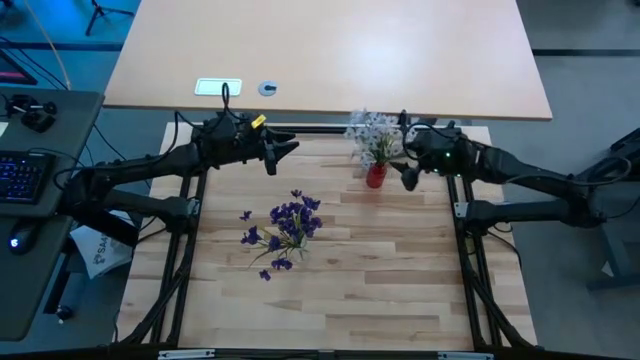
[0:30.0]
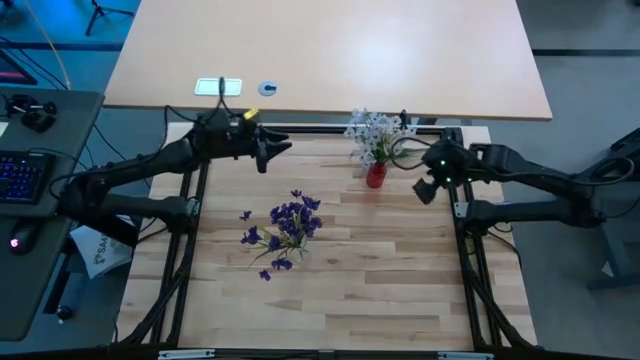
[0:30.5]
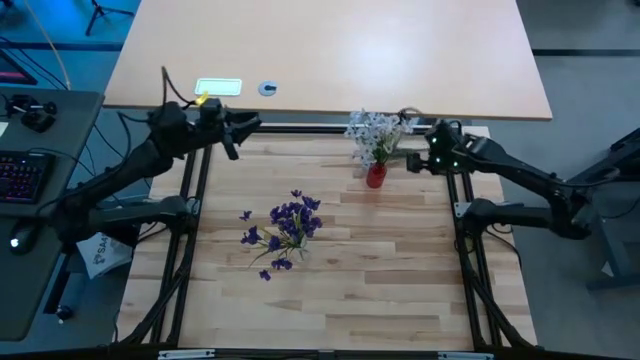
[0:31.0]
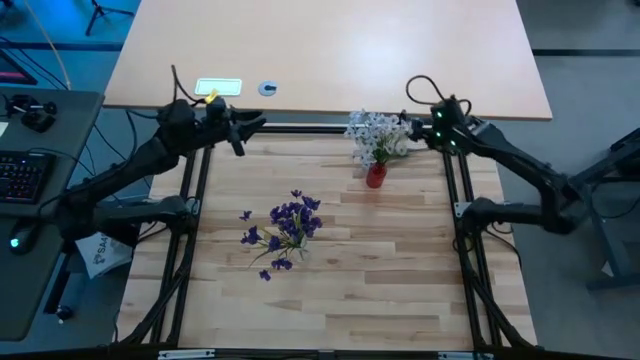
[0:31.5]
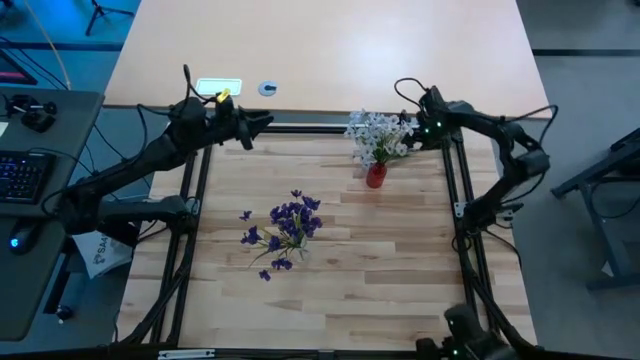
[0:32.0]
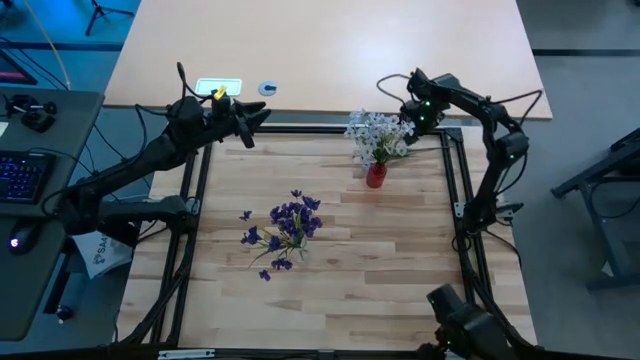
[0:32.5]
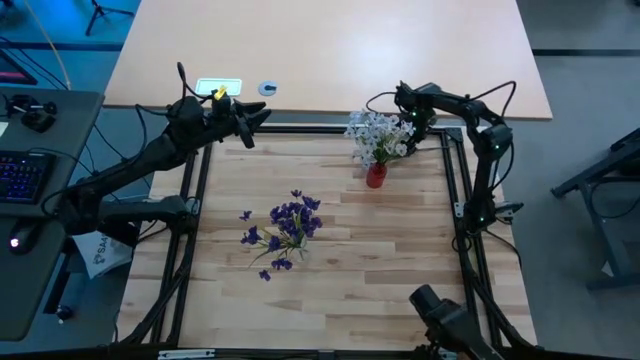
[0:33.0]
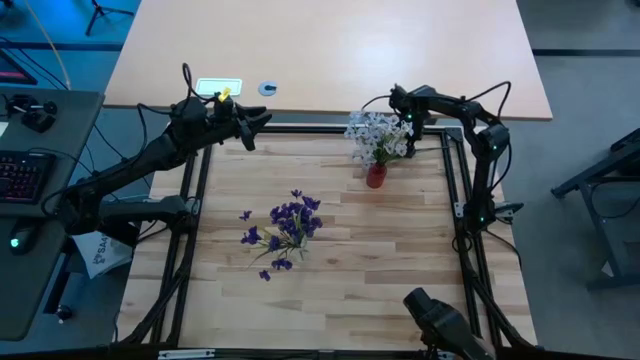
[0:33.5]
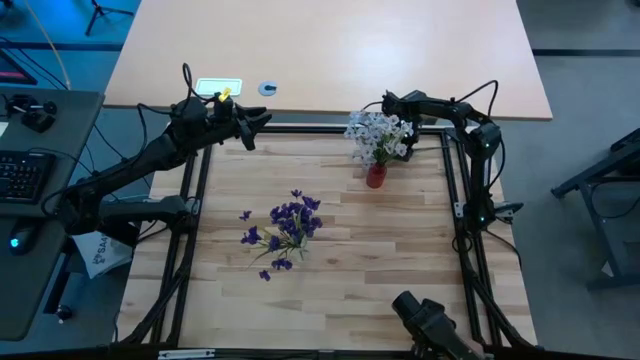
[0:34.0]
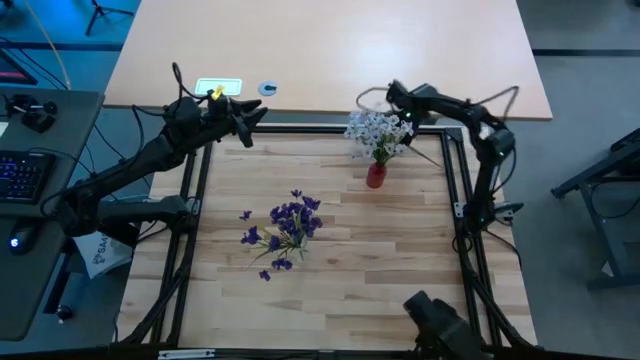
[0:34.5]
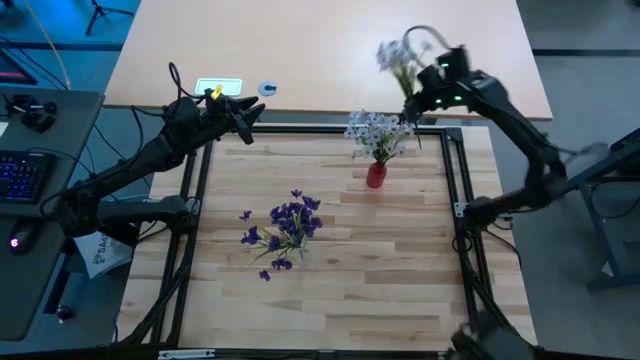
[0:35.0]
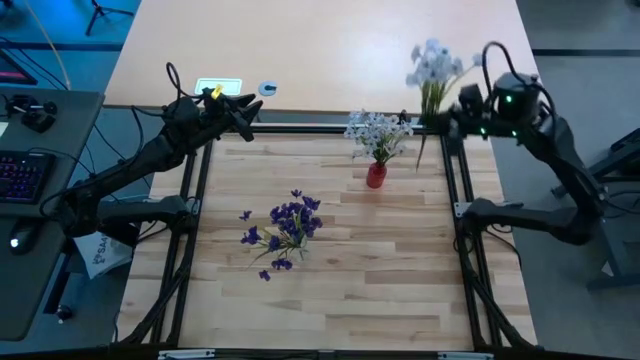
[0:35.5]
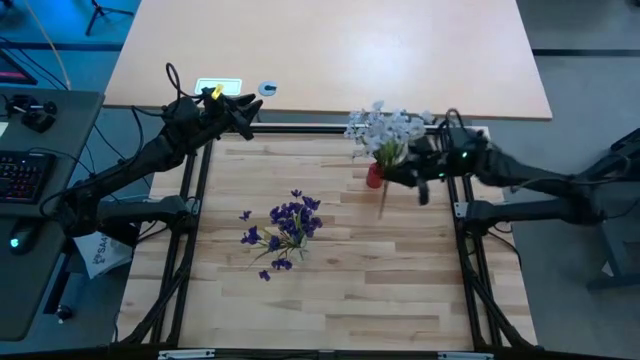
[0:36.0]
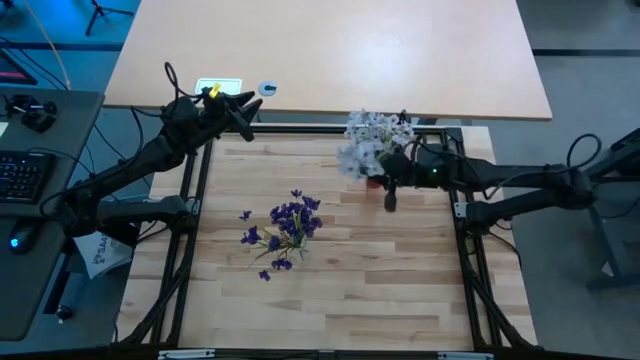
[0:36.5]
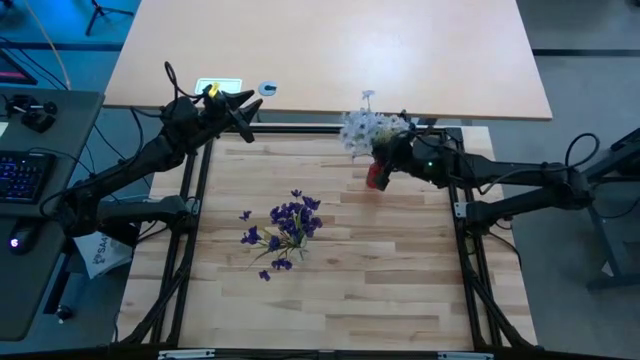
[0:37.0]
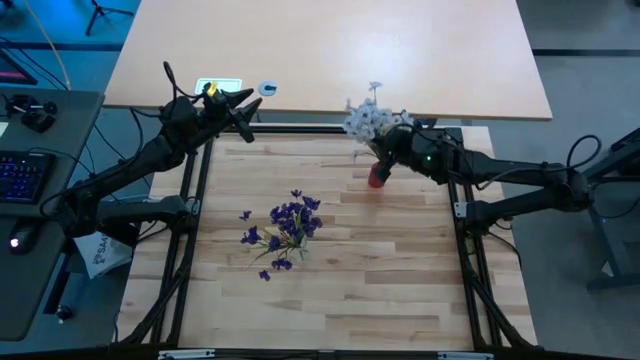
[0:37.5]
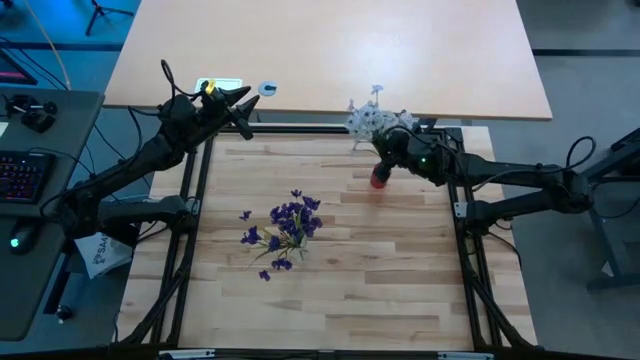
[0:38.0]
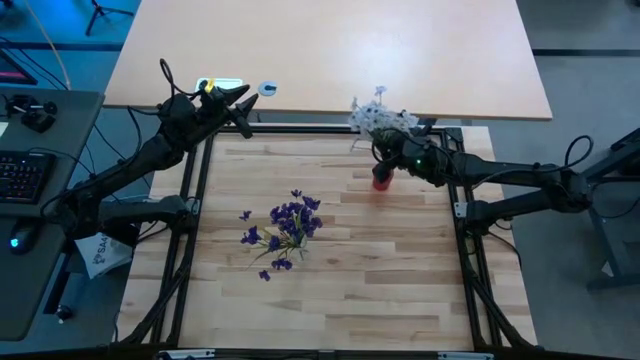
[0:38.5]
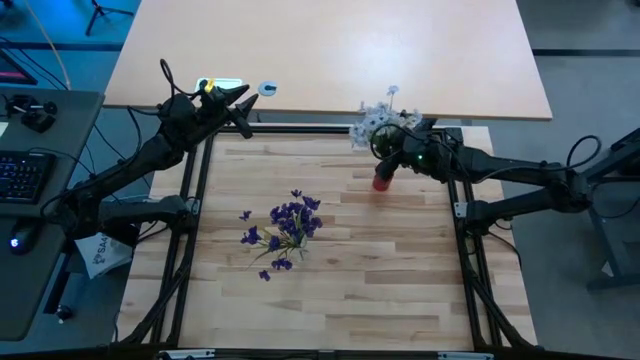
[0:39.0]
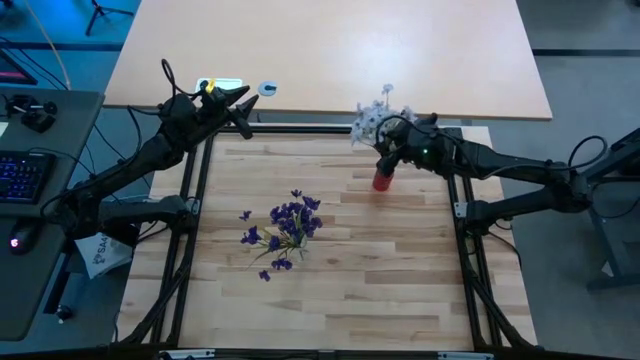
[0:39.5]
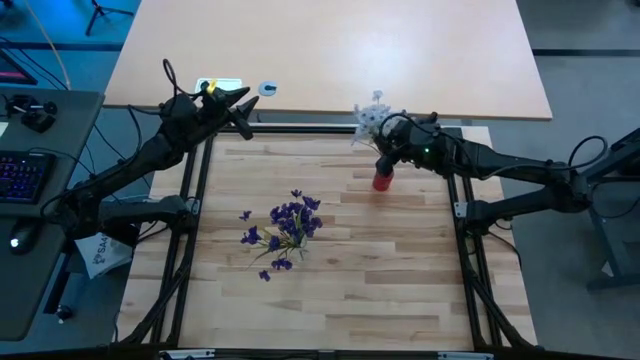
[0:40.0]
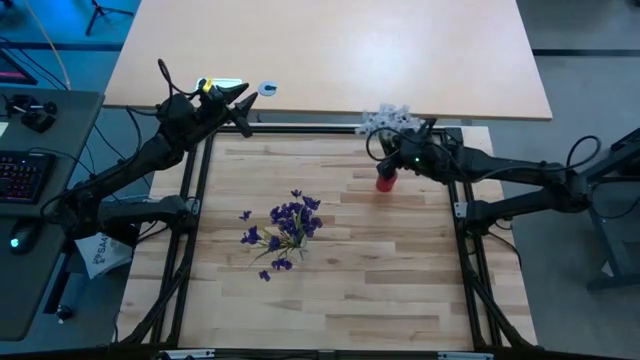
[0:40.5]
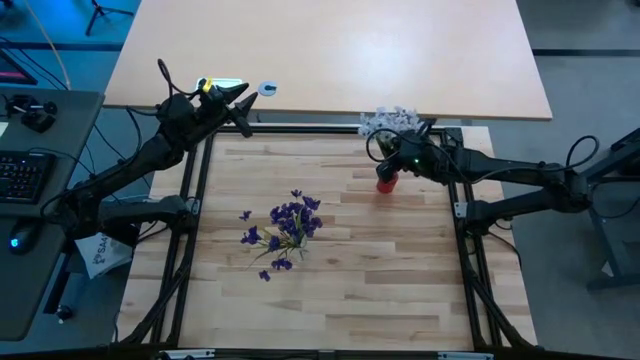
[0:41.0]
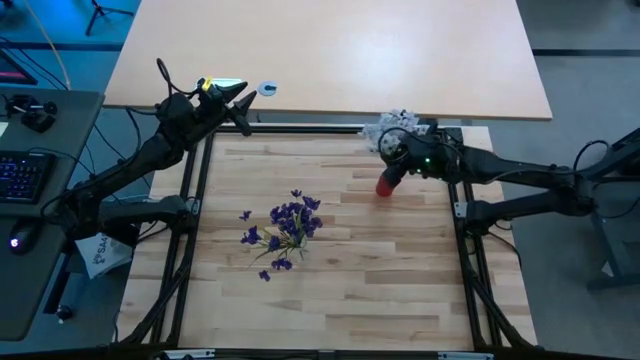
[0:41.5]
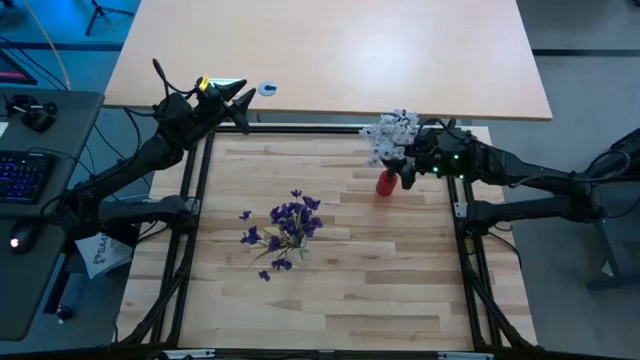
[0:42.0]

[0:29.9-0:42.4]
Task: Sort flowers into vase by color
Put the white flowers into the red vase

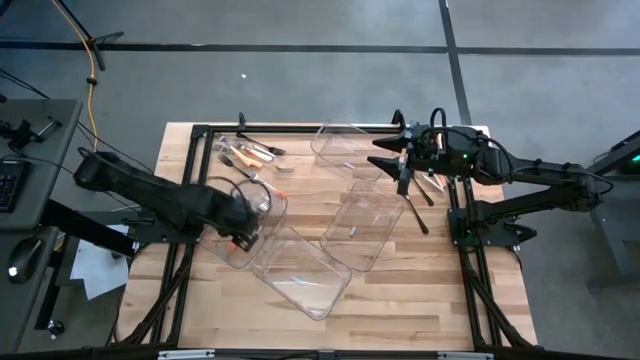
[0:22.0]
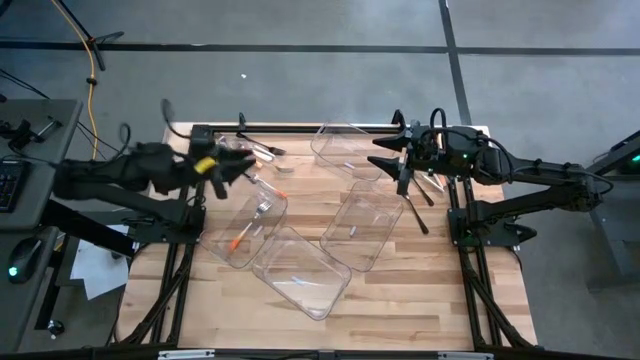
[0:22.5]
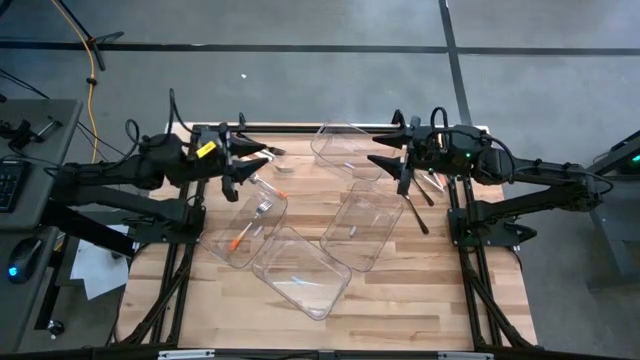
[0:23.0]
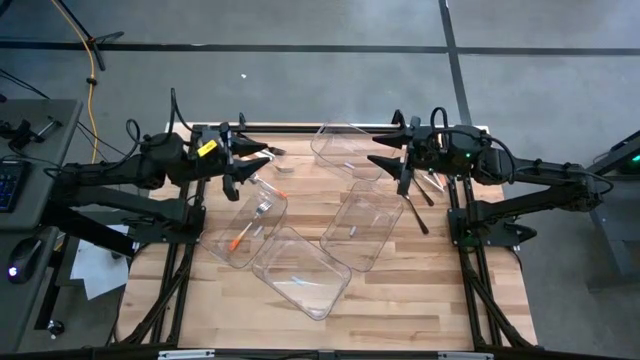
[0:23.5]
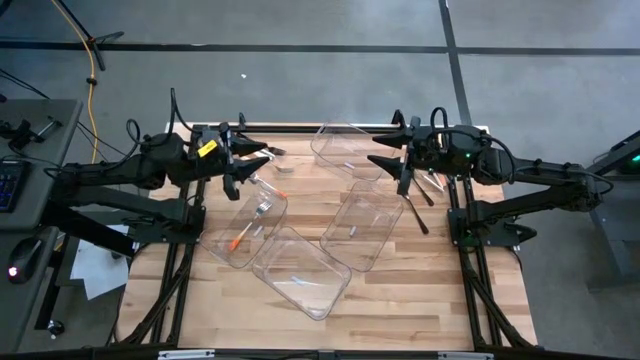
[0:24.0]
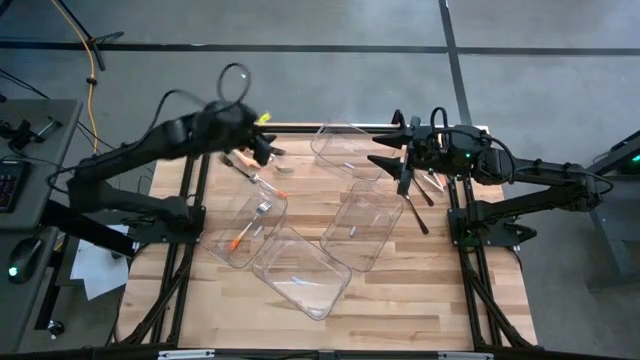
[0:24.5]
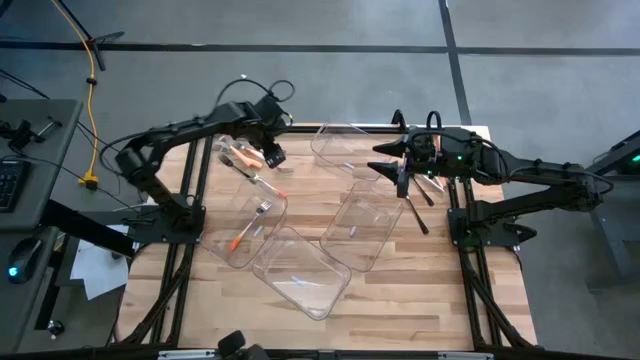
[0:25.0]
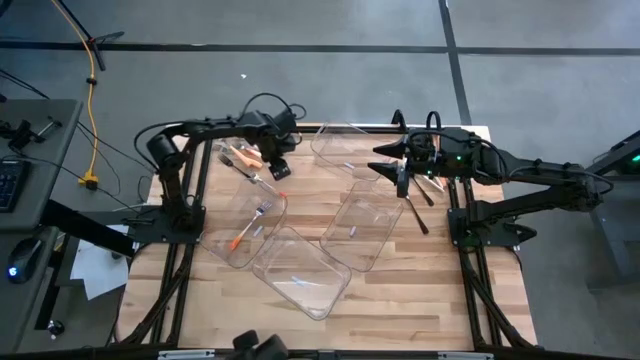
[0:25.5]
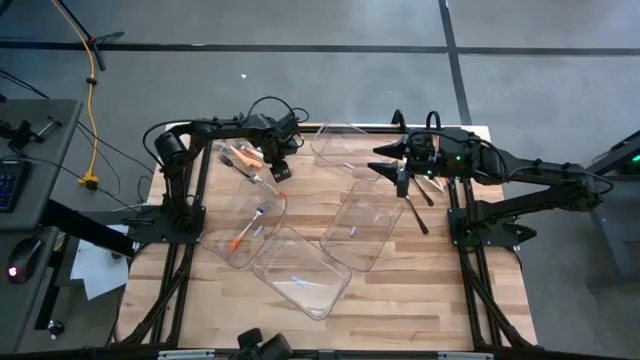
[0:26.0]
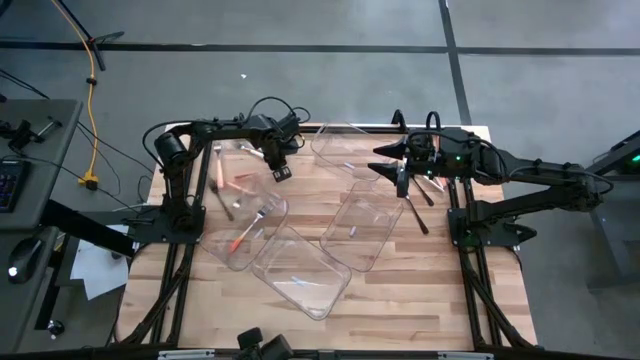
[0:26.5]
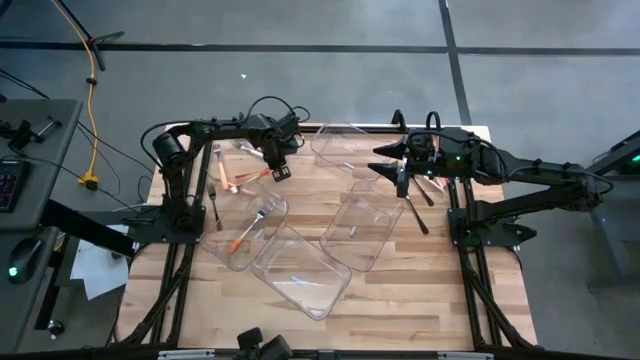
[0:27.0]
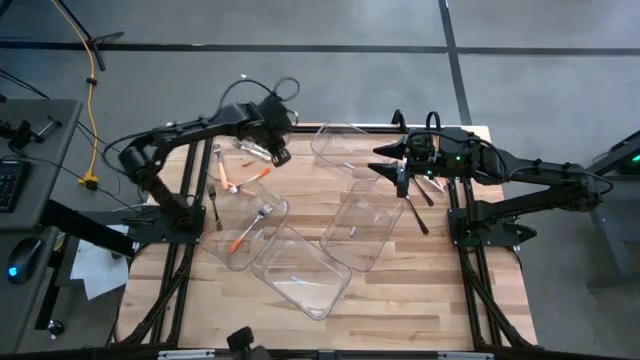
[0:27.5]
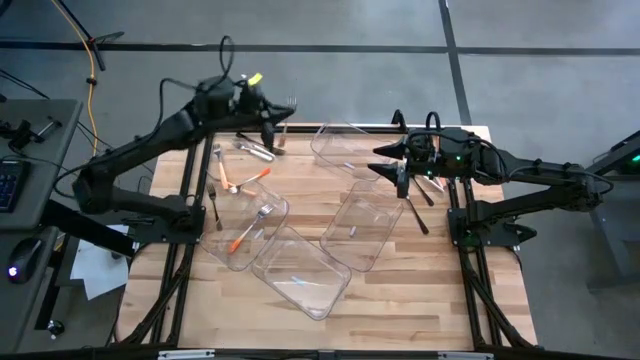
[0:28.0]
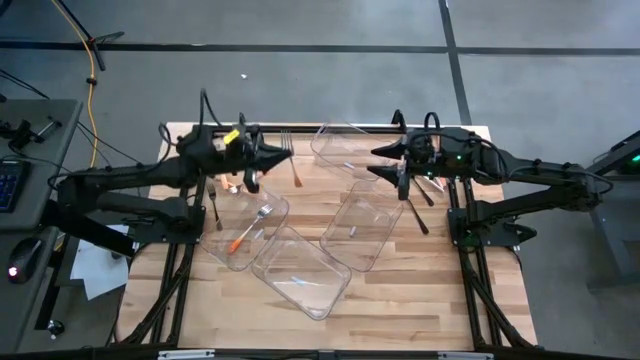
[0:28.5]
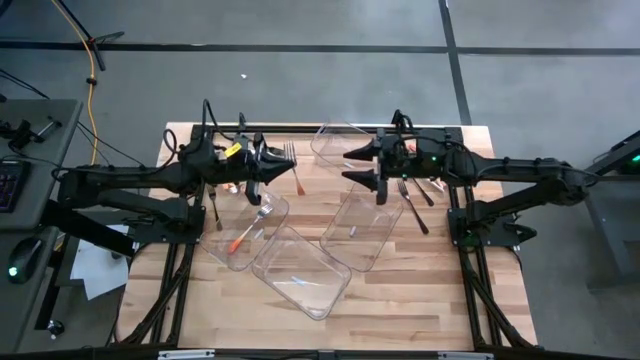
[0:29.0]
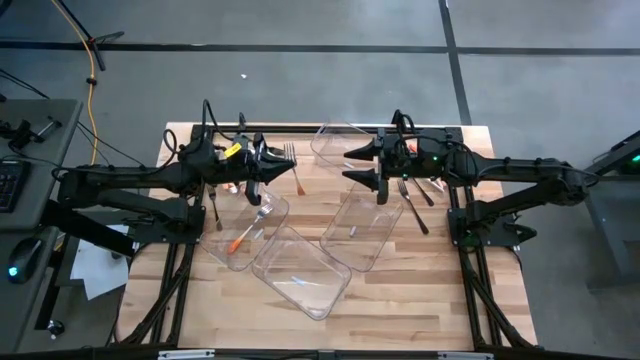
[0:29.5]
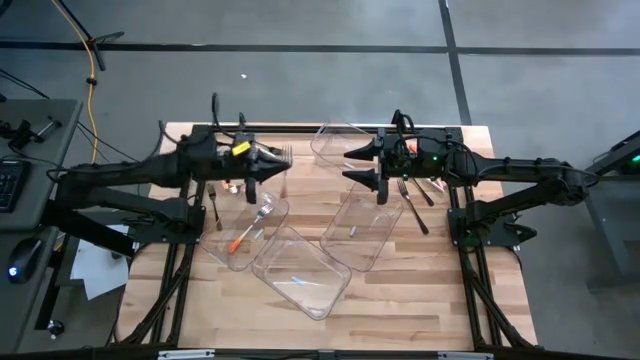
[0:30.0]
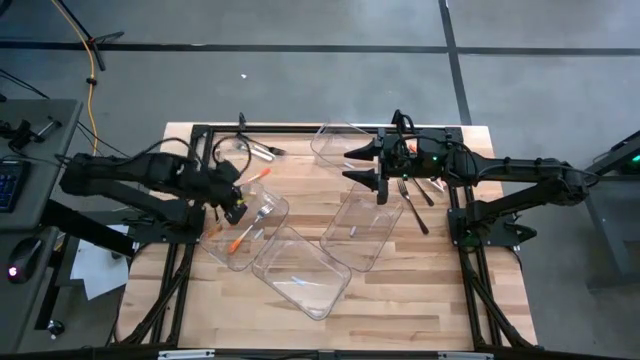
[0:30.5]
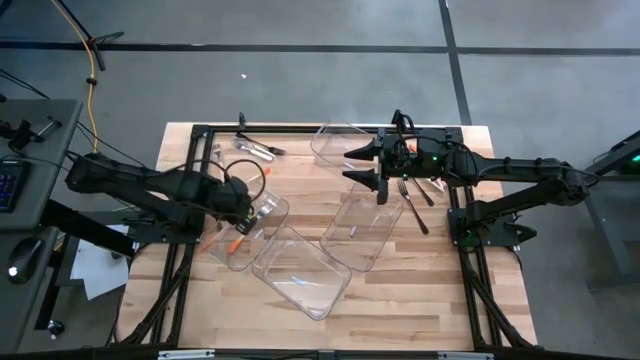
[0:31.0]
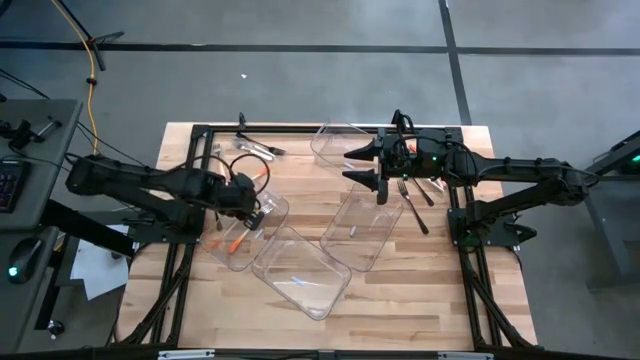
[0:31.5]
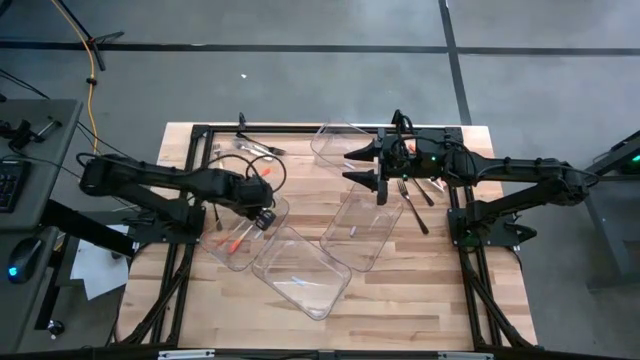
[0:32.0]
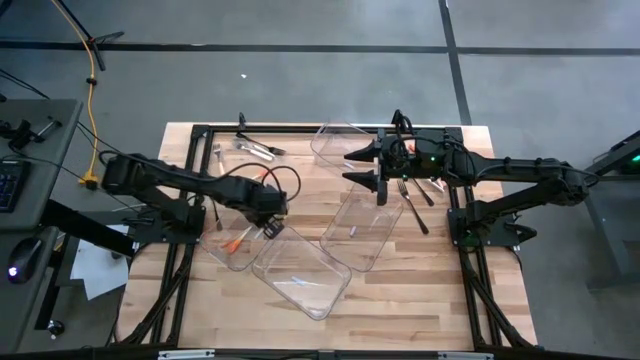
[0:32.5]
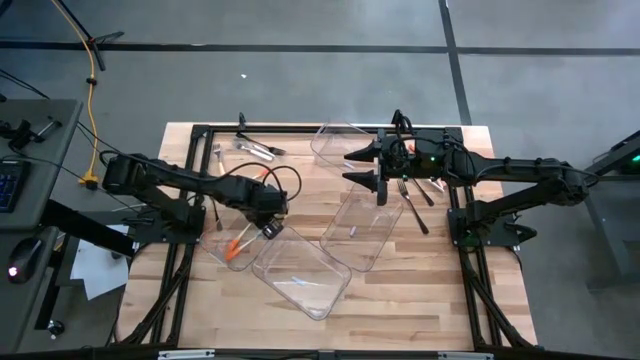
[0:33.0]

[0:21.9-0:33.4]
Task: Sort silverware by color (type)
Put the orange fork into the middle left transparent bin
